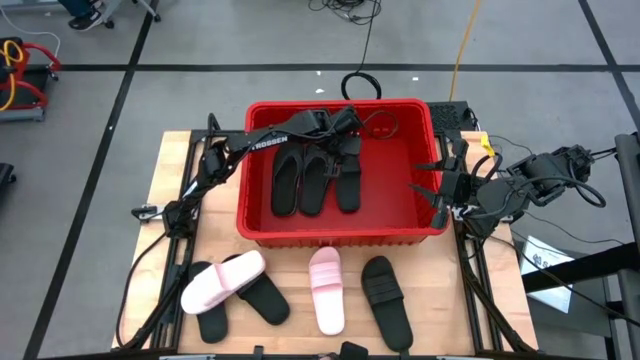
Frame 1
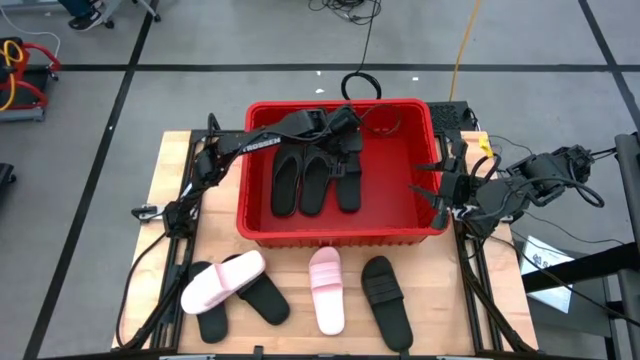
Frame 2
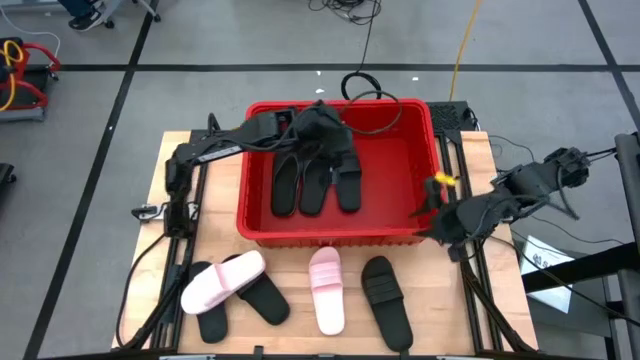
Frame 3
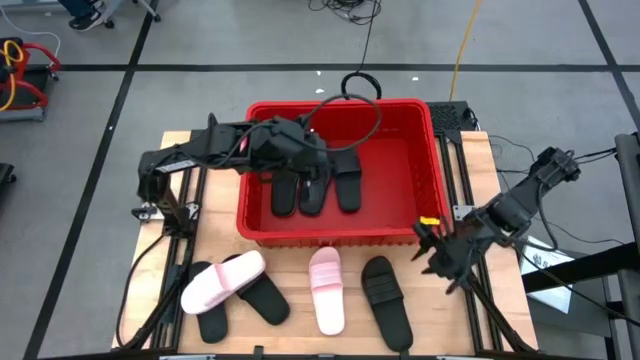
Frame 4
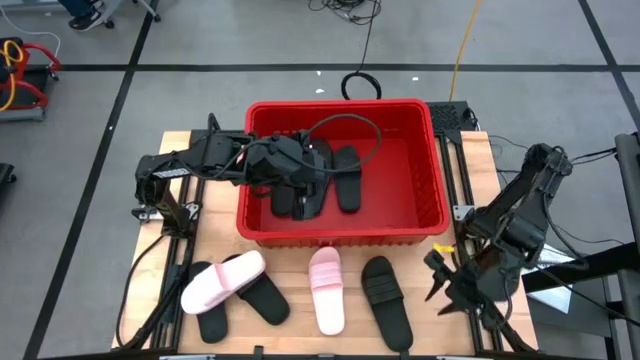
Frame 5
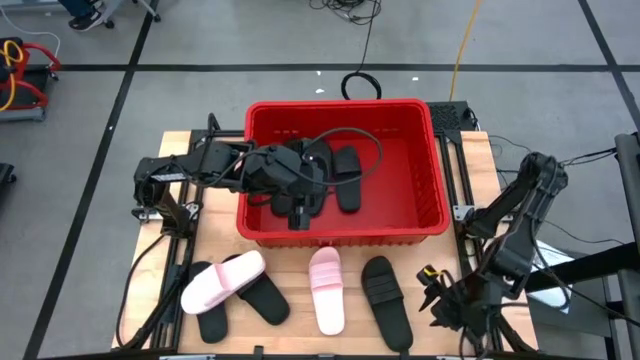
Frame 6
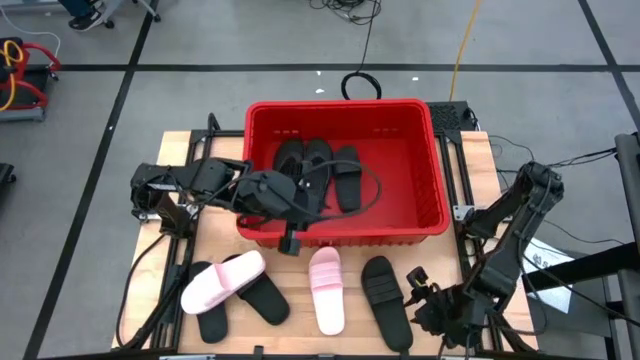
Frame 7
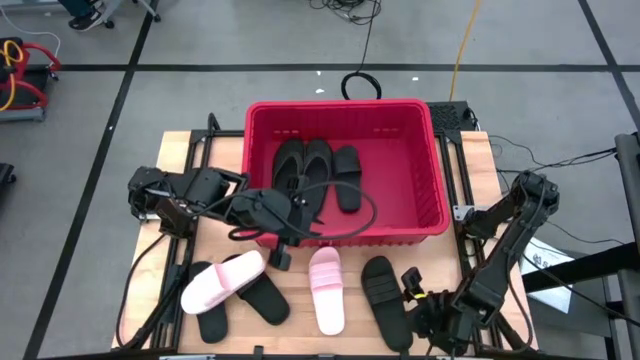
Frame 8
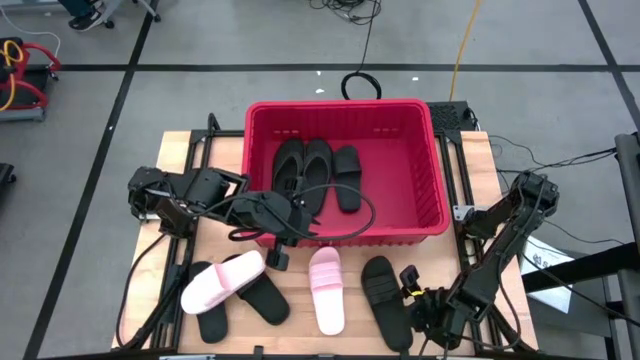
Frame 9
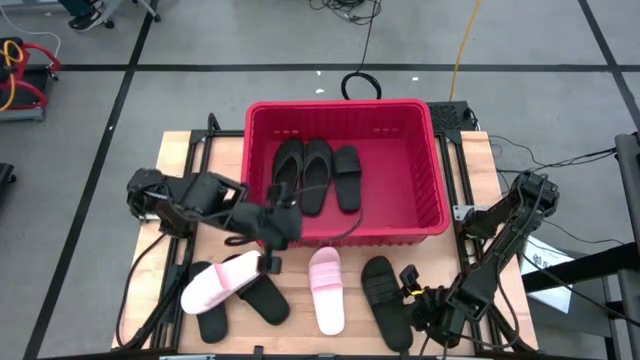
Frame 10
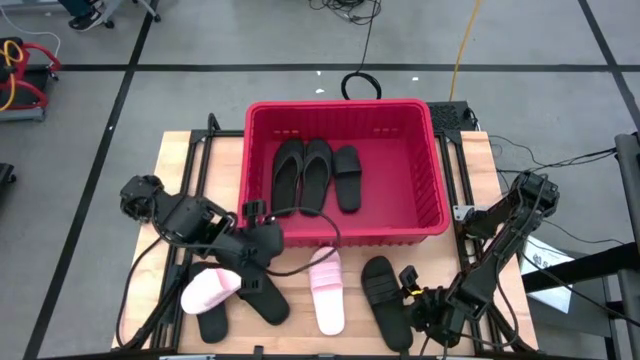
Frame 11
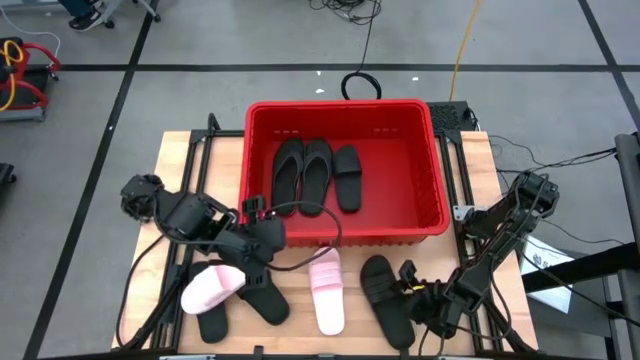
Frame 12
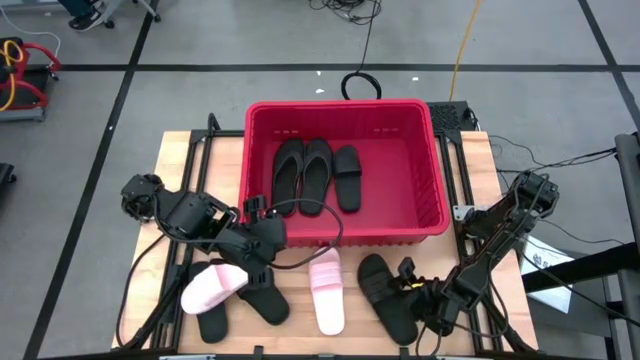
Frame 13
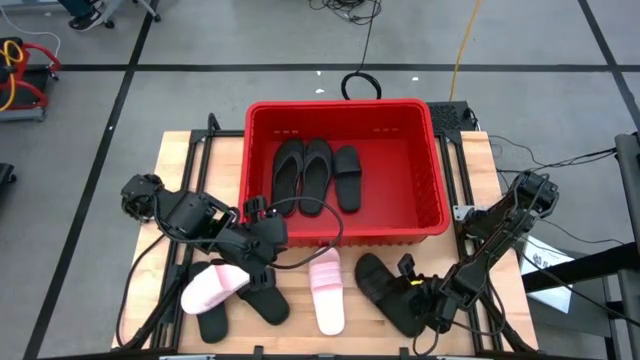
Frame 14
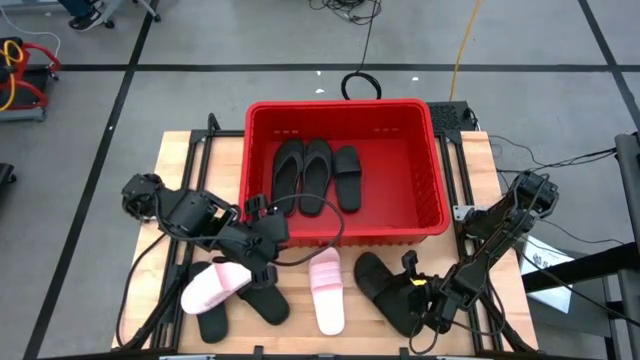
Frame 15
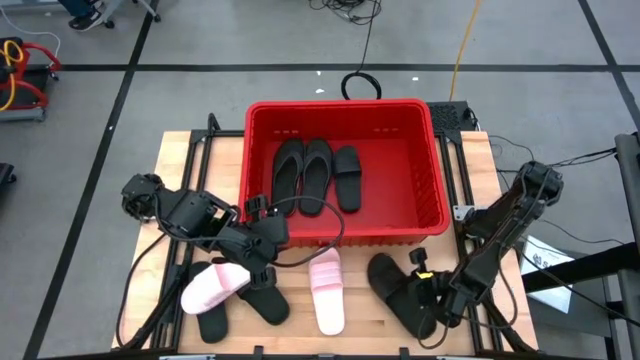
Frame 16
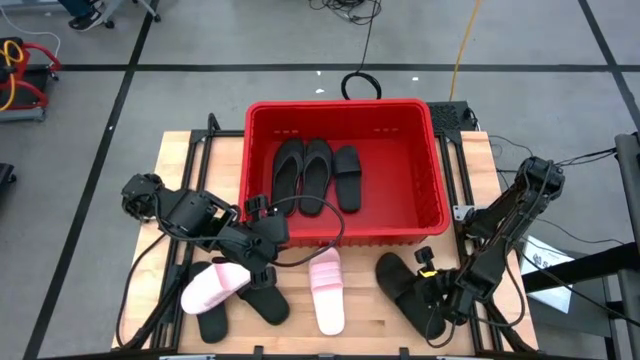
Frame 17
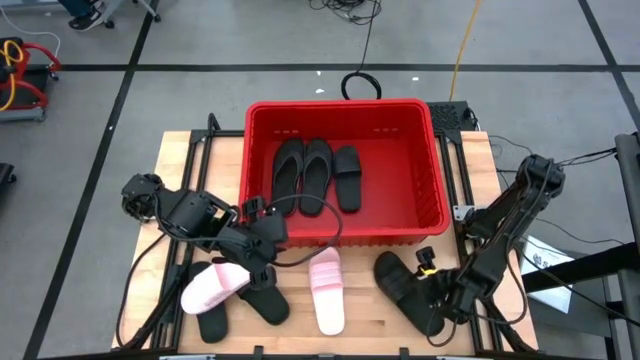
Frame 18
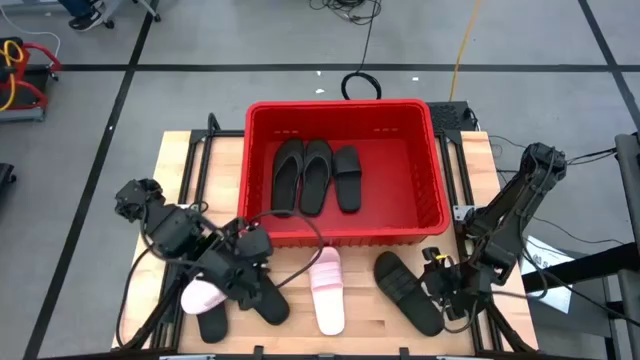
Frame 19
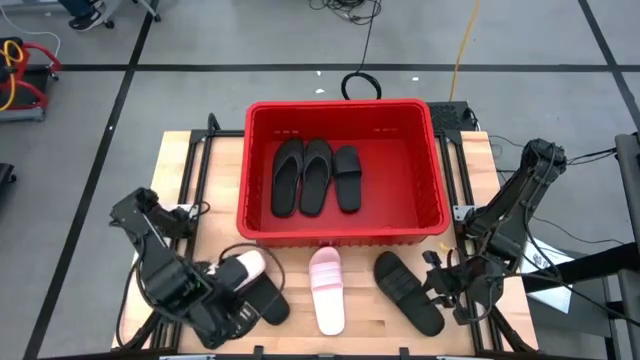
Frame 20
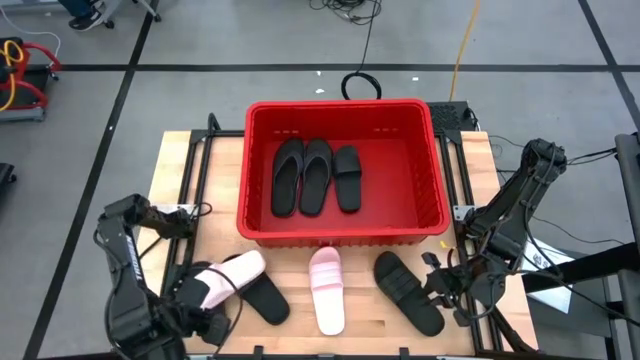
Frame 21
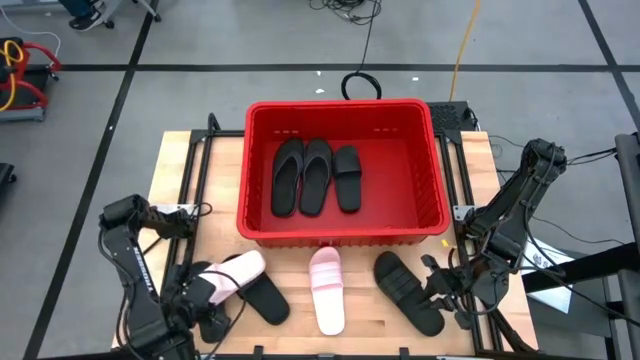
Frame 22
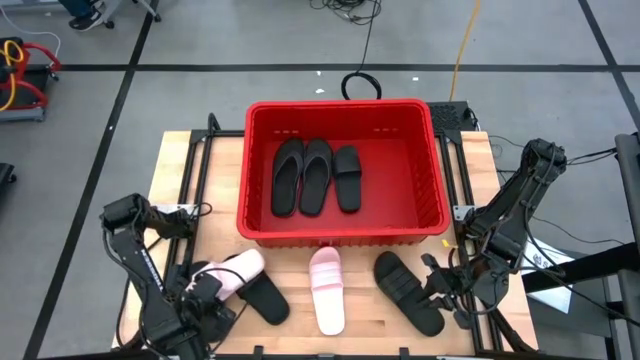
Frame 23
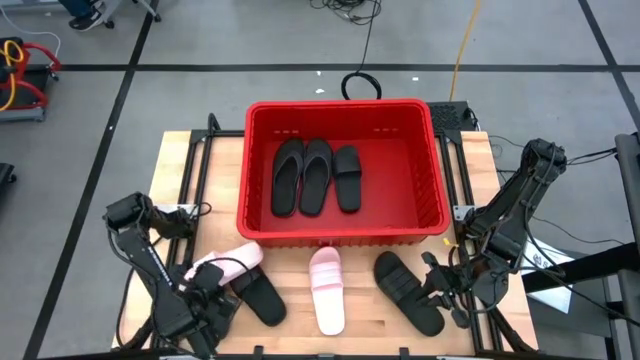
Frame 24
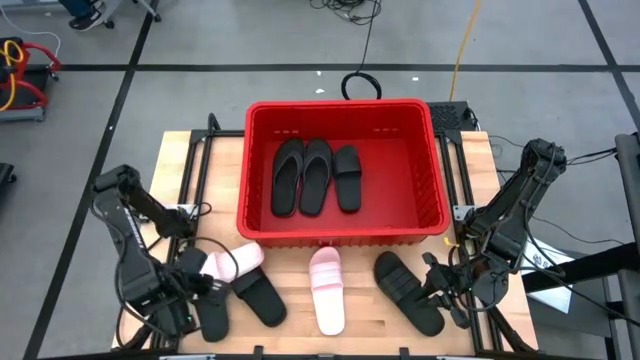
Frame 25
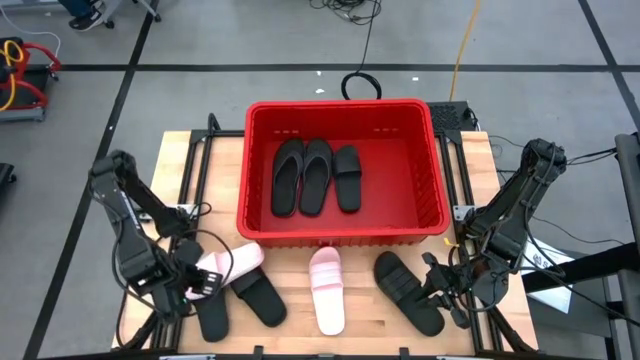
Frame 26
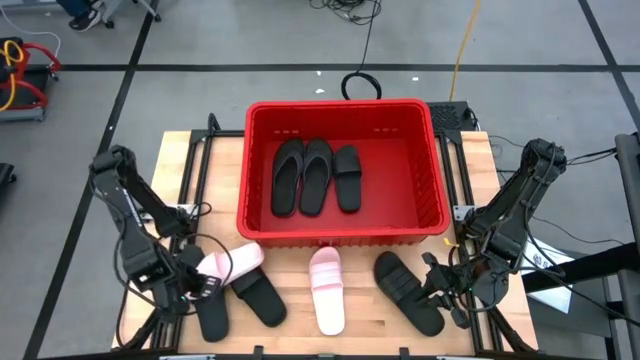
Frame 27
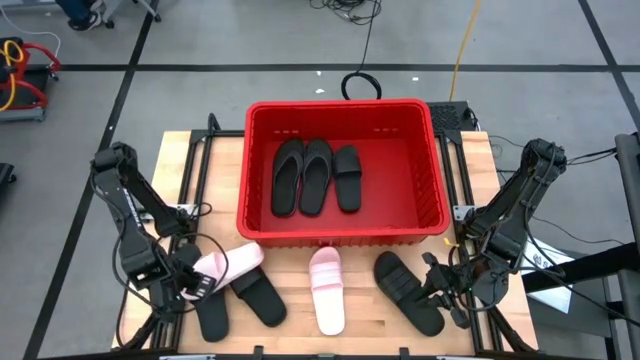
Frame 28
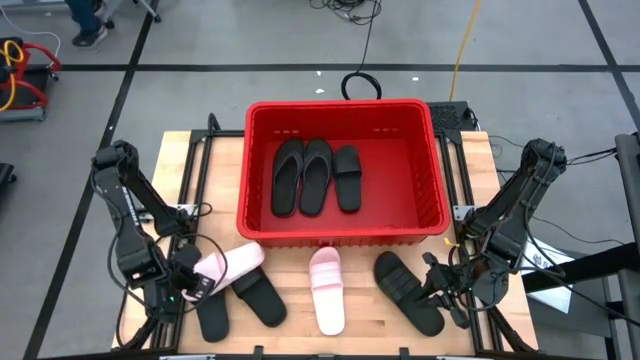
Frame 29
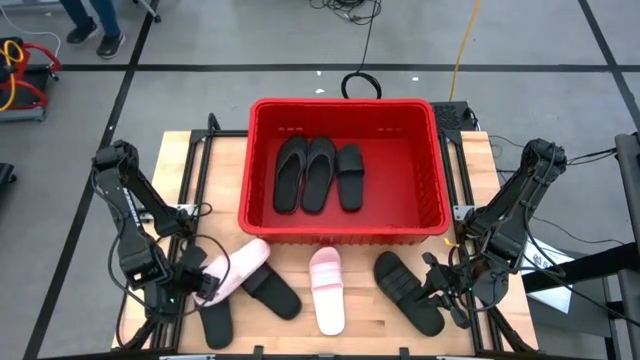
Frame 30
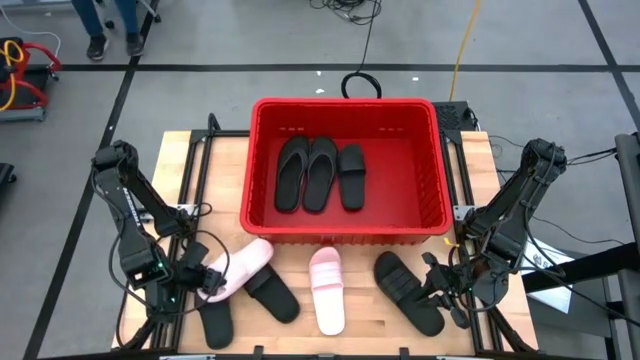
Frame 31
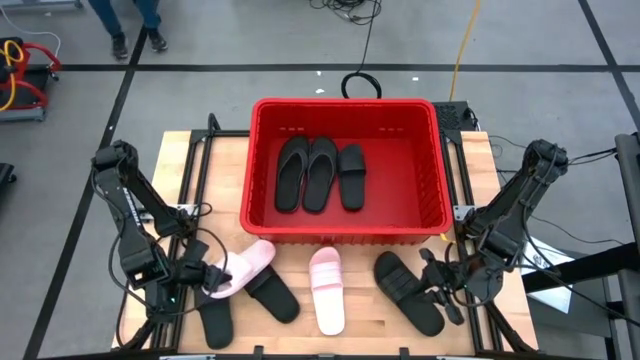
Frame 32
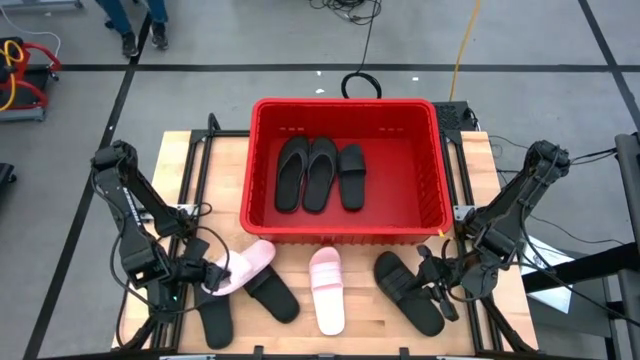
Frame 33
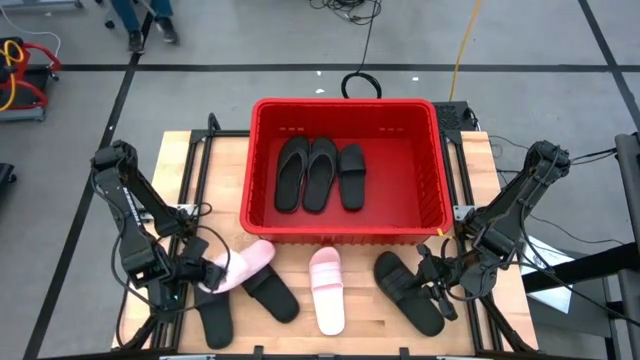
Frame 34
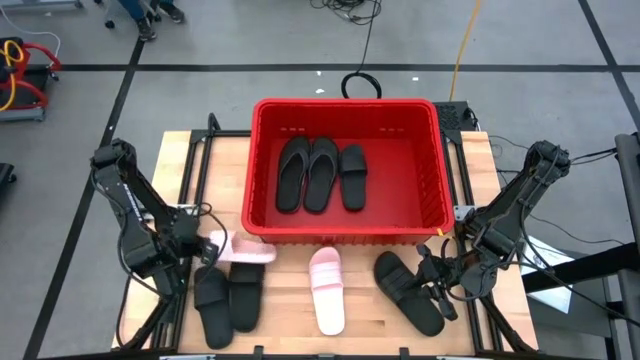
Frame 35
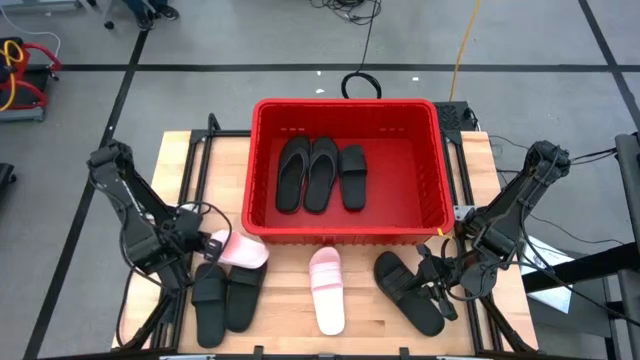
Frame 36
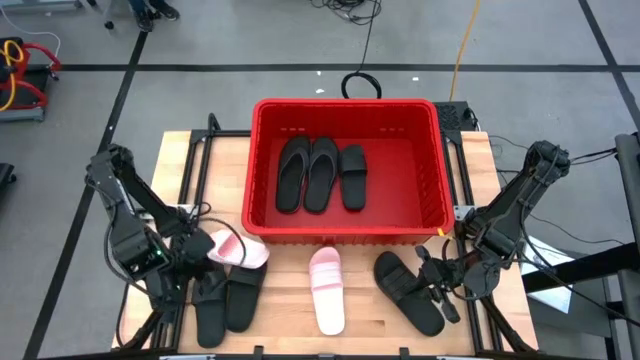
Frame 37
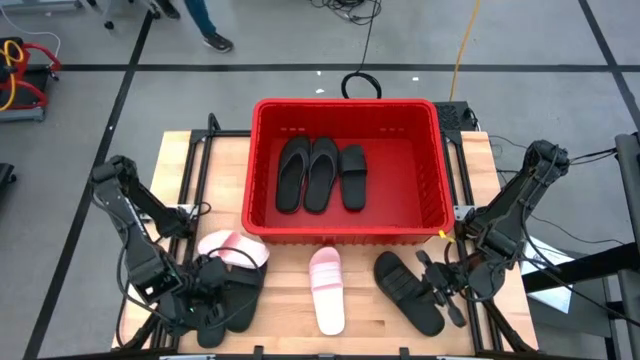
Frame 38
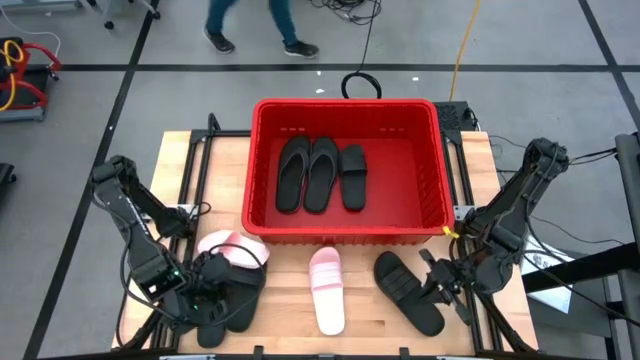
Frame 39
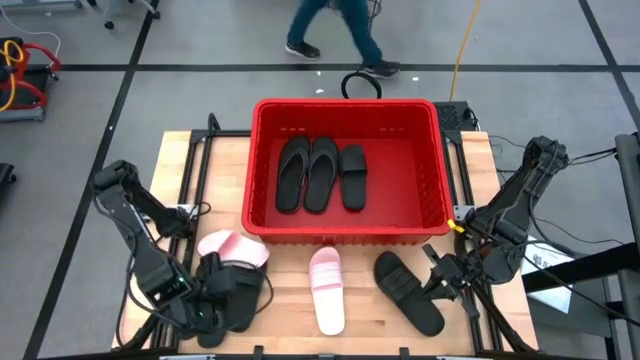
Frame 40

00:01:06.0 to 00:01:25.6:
Task: Pick and place slides into bin
Put the black slide into the red bin

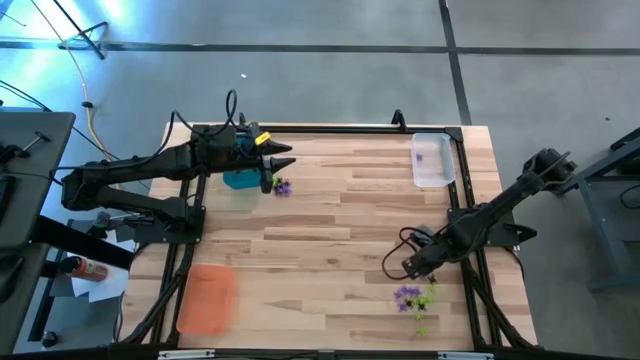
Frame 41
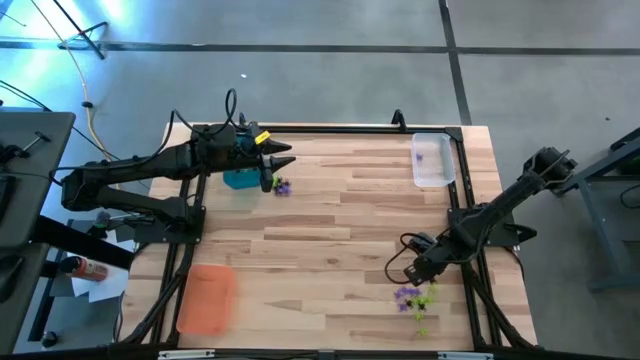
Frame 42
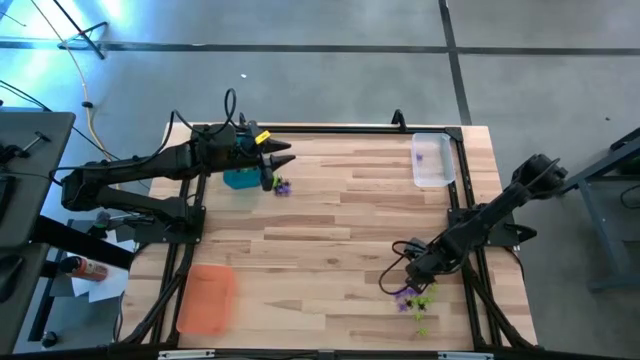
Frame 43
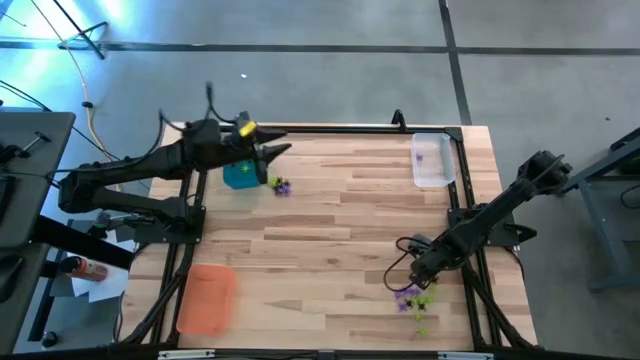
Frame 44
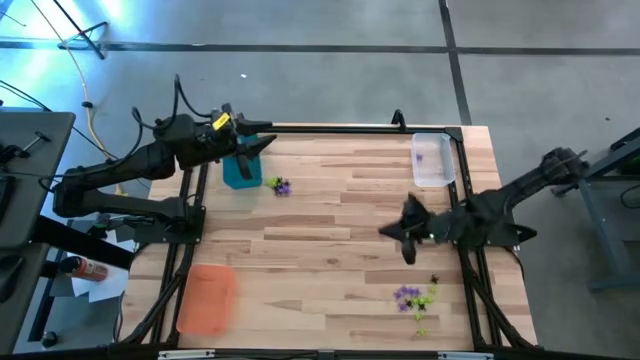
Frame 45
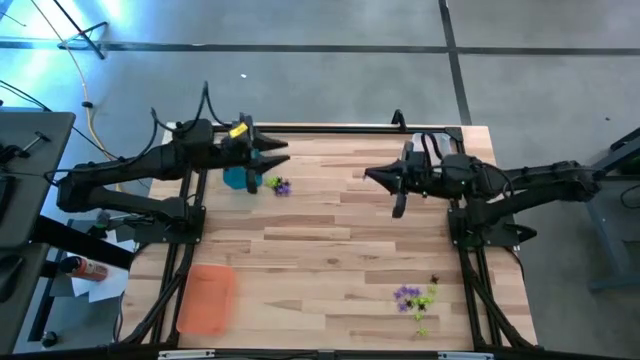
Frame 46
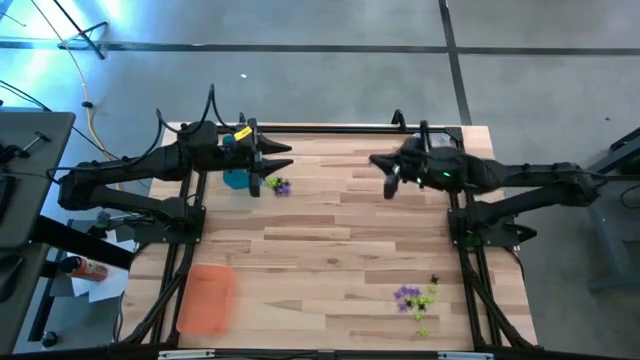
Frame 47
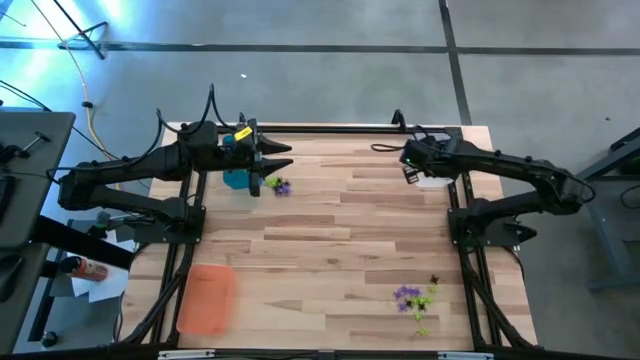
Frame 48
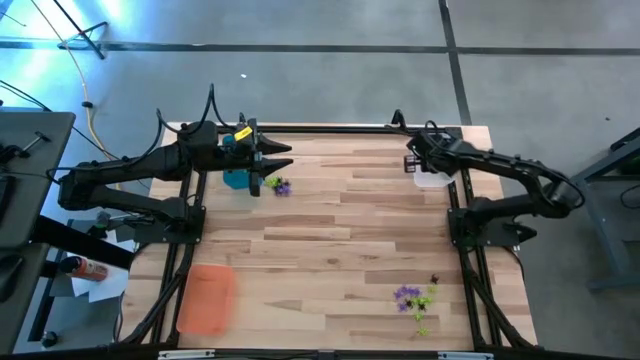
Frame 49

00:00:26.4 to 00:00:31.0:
Task: Sort Halloween decoration
Put the purple spider toy into the transparent bin
